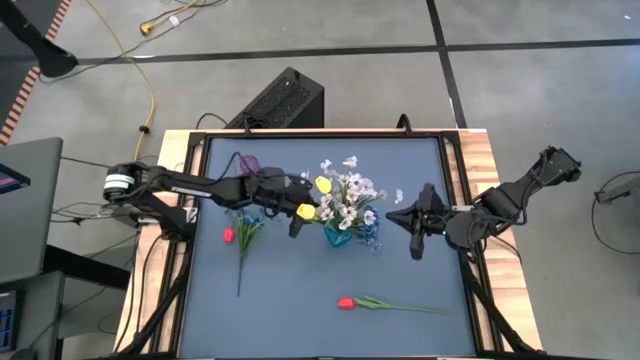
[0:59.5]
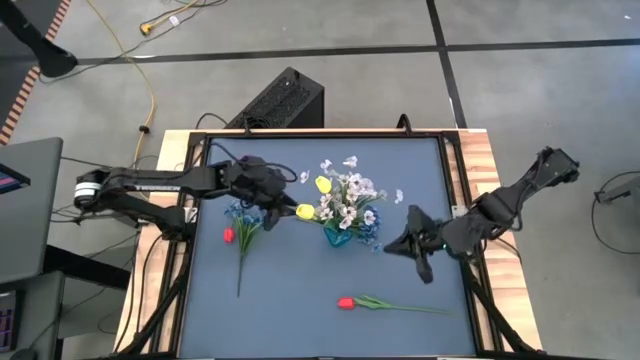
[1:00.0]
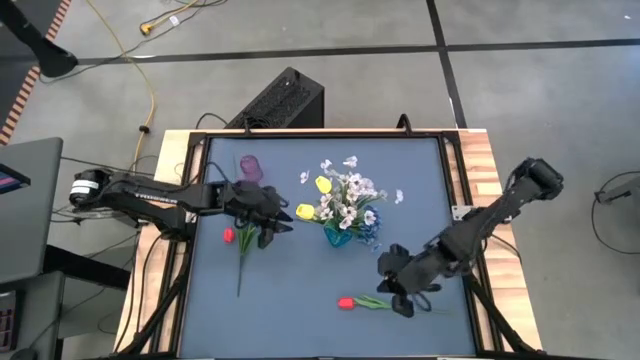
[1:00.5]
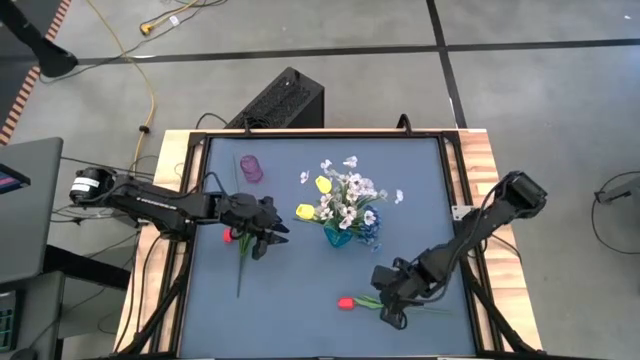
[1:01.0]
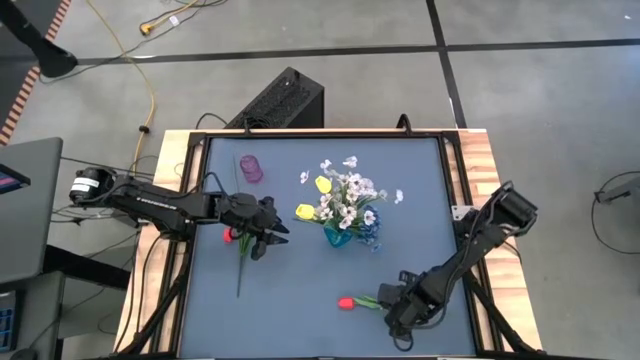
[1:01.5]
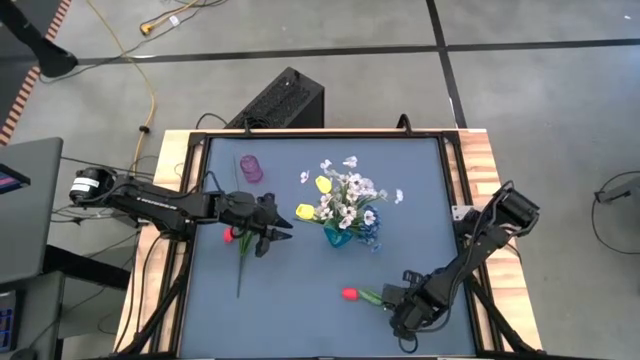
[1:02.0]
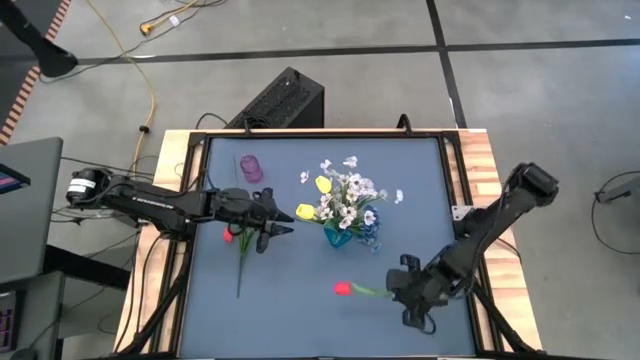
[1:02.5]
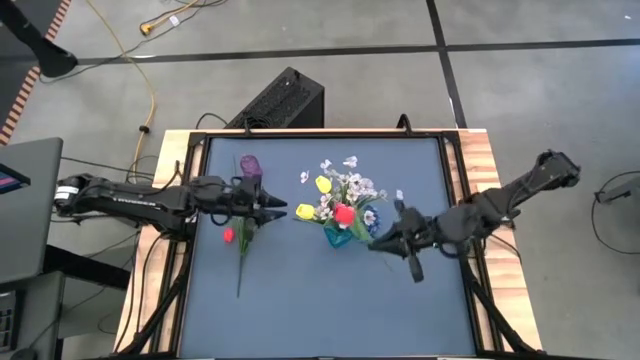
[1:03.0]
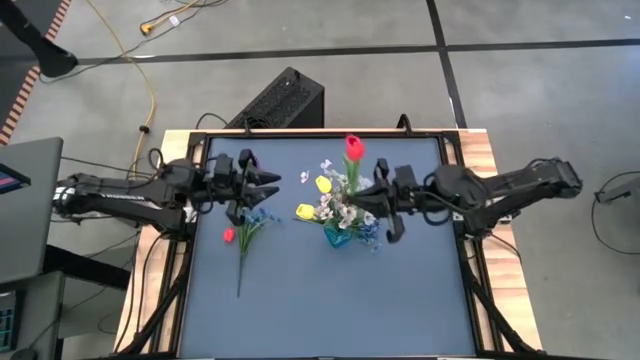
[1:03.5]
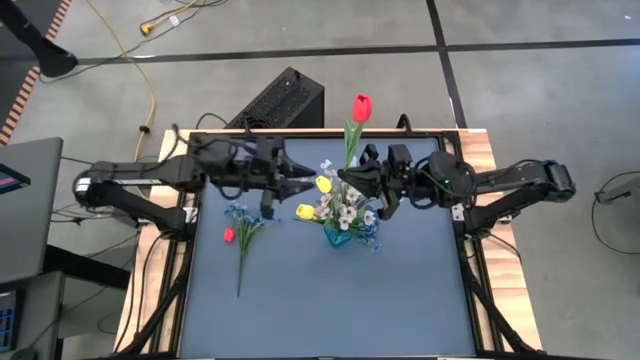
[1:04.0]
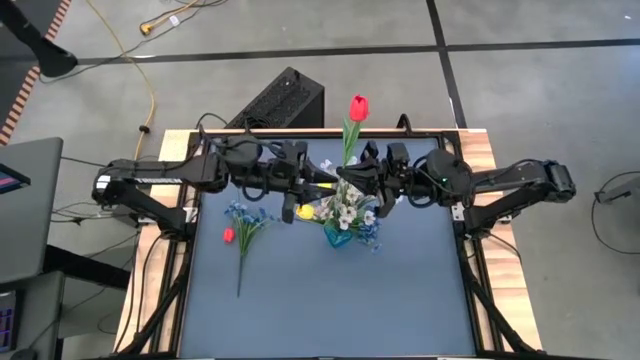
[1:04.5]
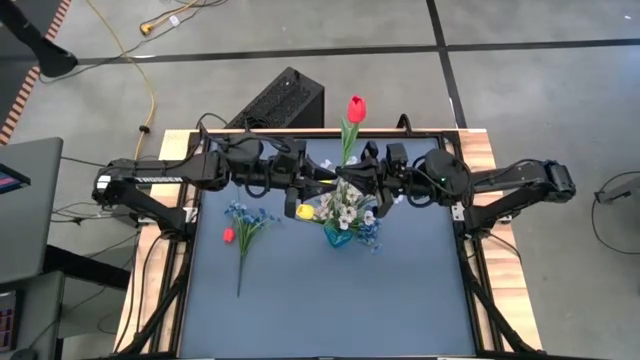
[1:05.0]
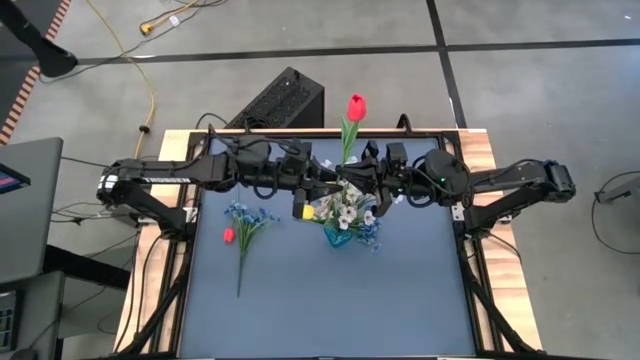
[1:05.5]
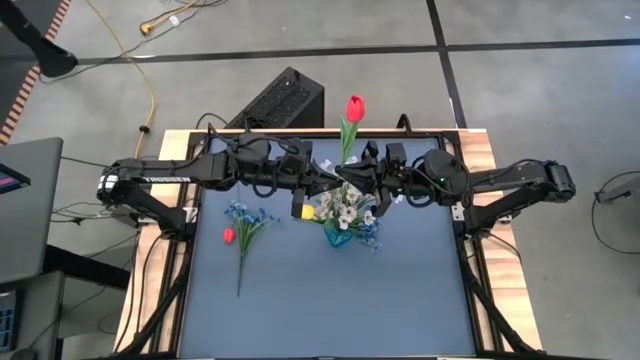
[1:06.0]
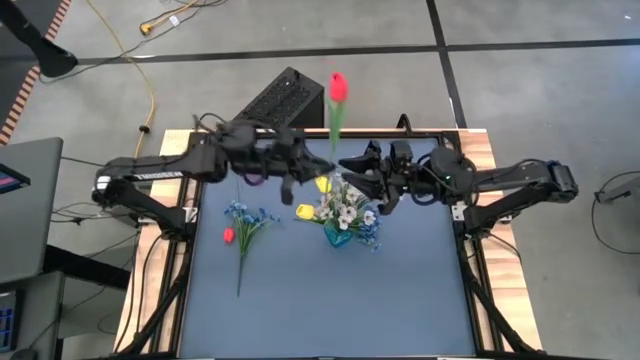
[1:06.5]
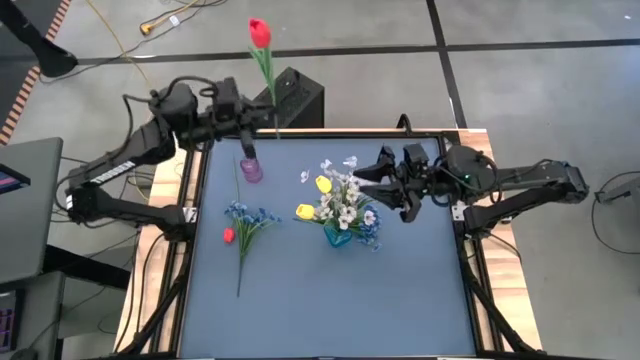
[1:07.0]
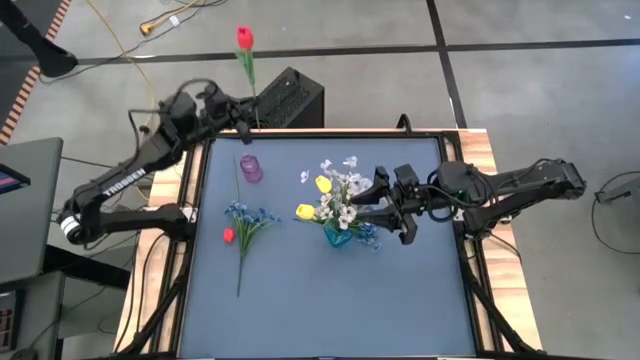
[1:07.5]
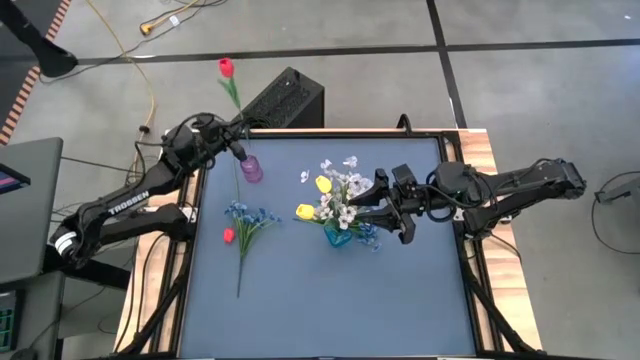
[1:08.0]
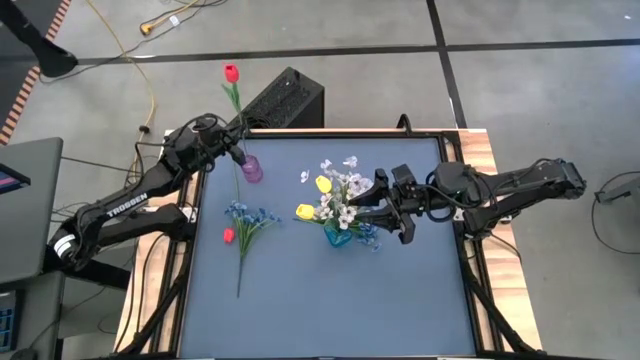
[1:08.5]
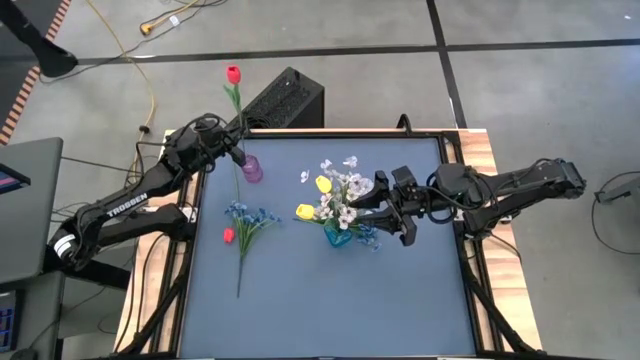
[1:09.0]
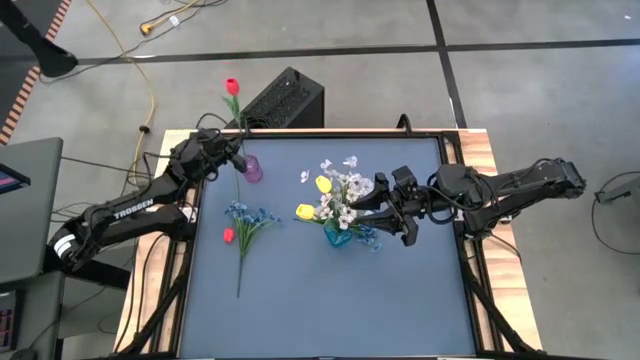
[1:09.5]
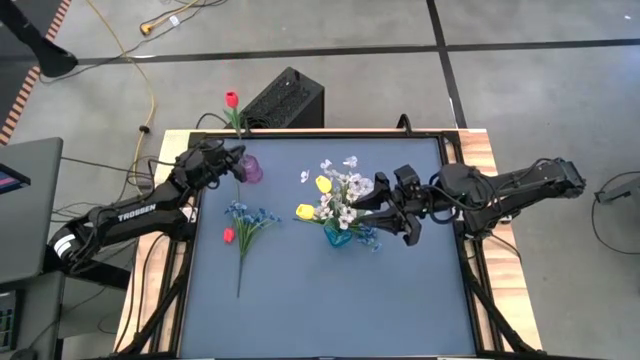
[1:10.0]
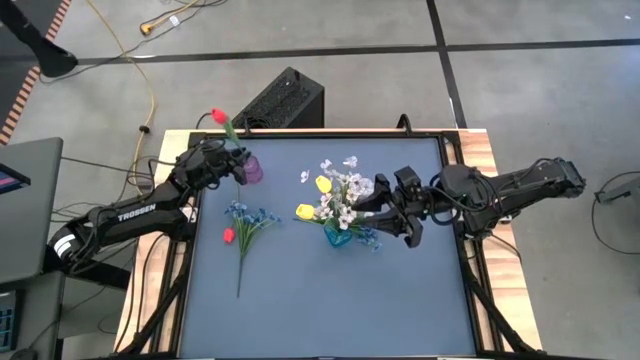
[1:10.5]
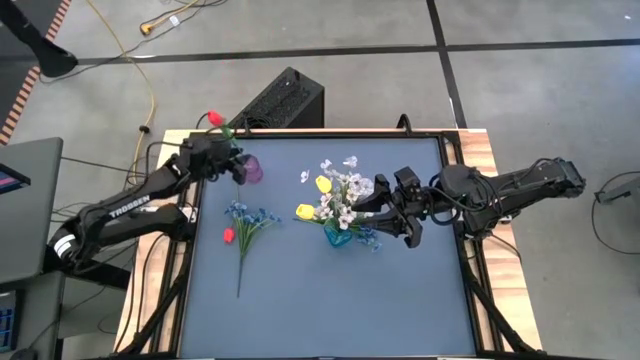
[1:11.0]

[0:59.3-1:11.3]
Task: Sort flowers into vase by color
Put the right red flower into the violet vase

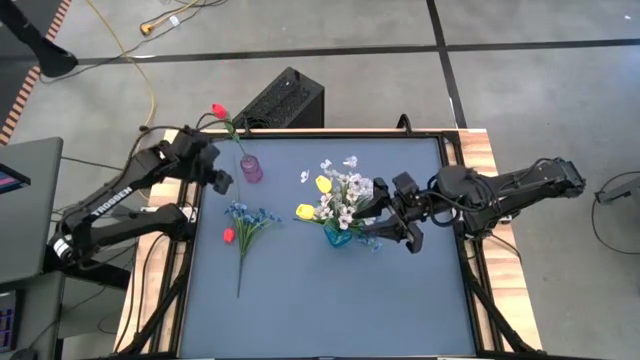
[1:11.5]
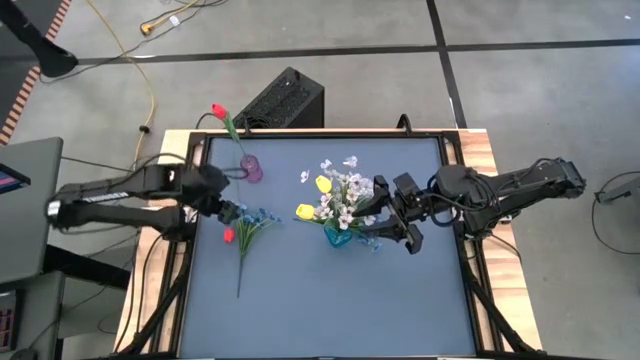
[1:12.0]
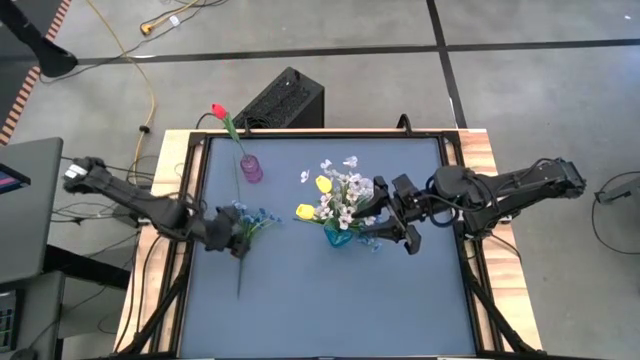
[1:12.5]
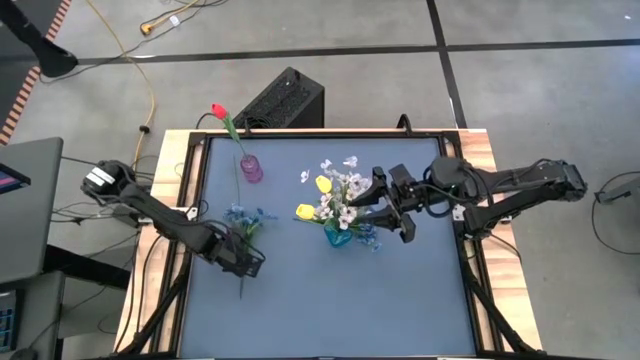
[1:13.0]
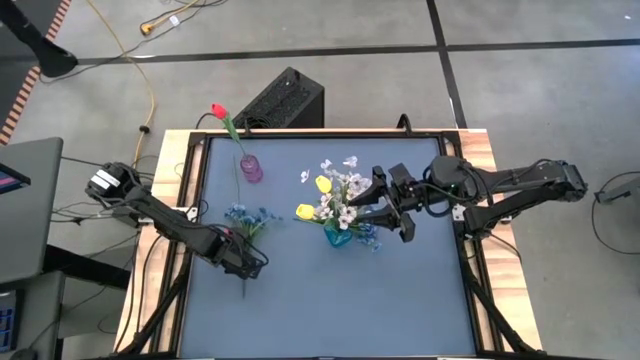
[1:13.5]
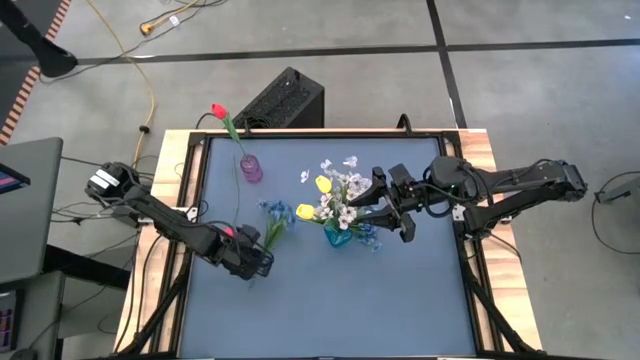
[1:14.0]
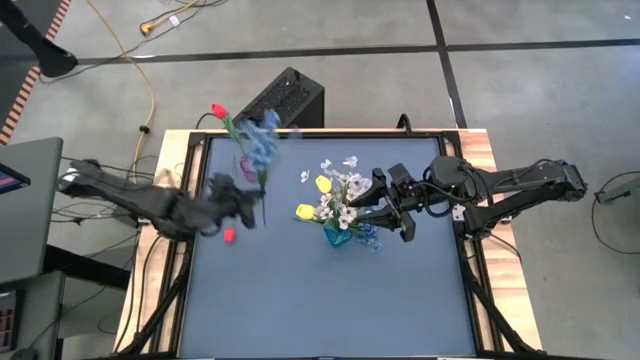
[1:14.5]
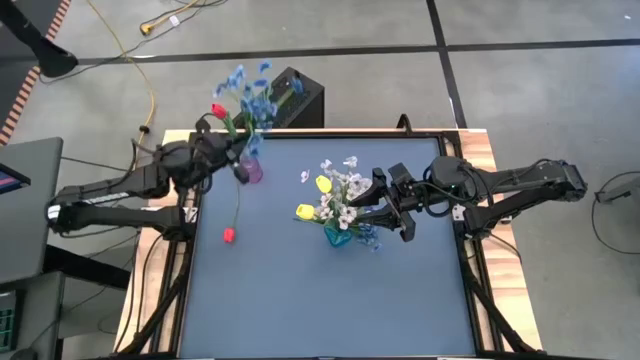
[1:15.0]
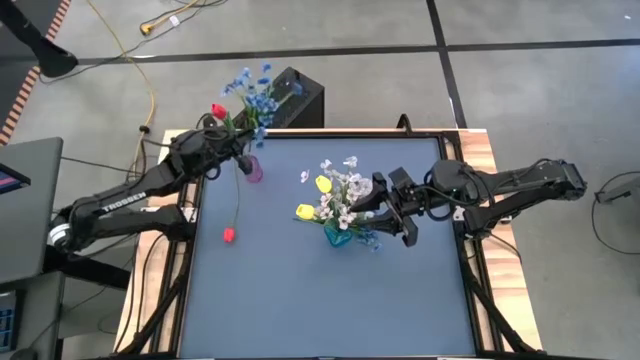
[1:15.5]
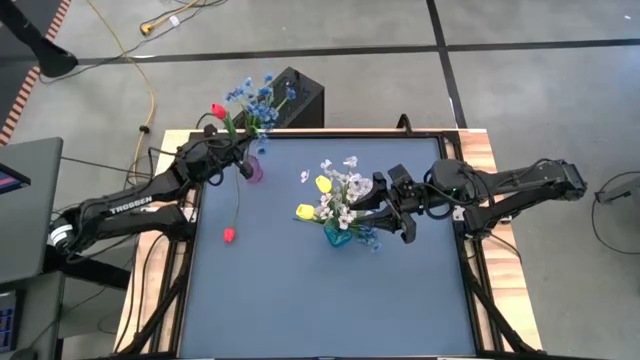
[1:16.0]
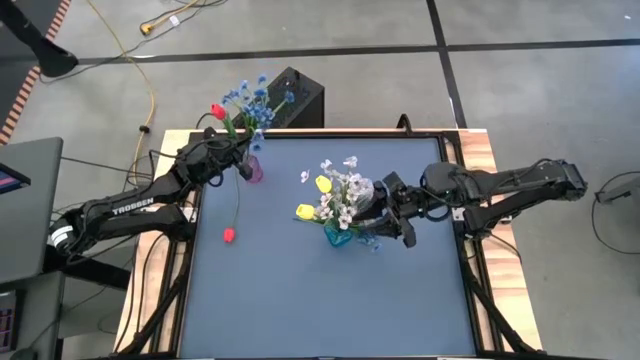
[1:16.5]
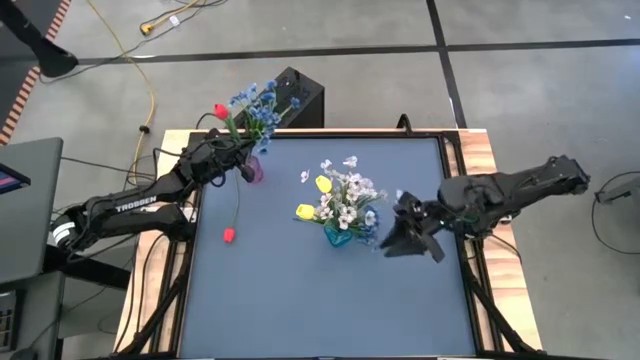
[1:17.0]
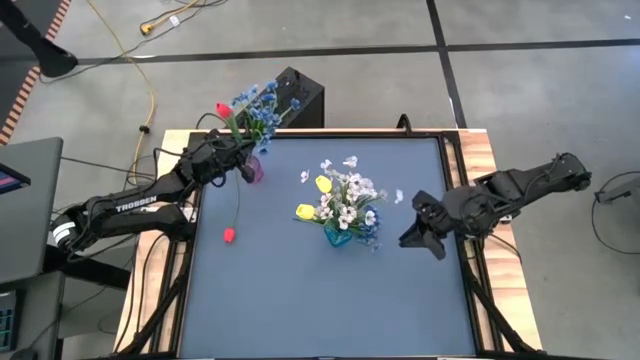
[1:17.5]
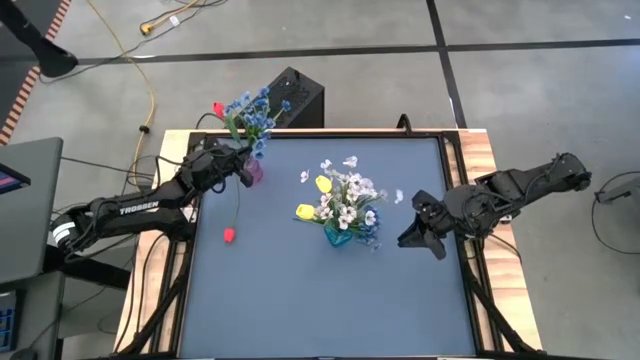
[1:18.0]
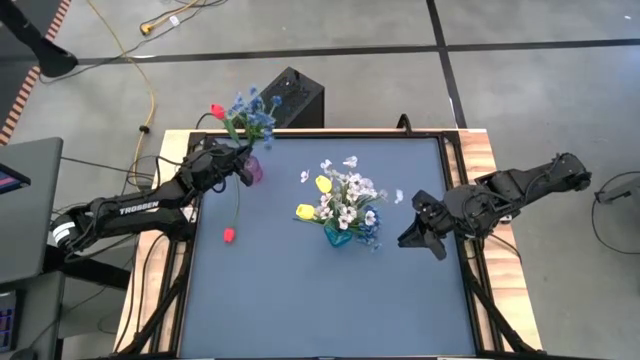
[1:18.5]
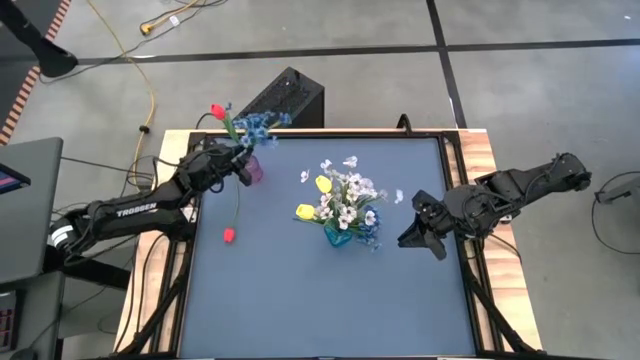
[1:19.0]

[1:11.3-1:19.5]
Put the left blue flower into the violet vase
